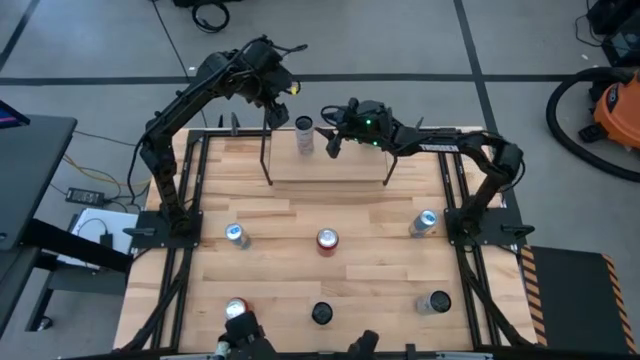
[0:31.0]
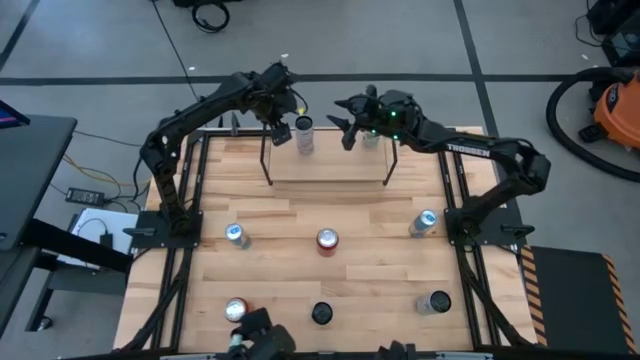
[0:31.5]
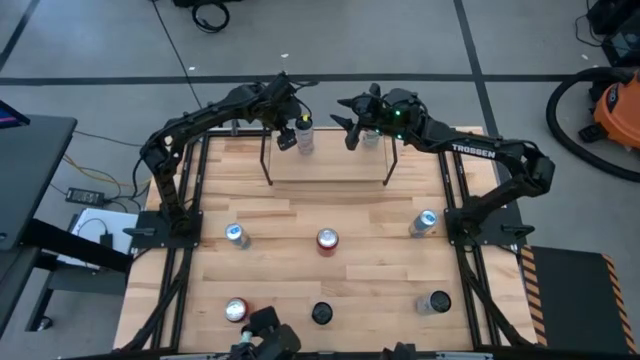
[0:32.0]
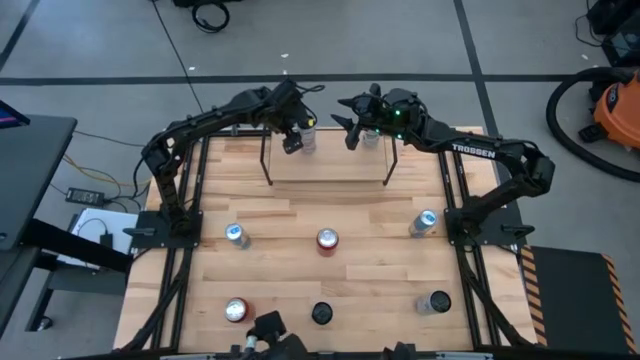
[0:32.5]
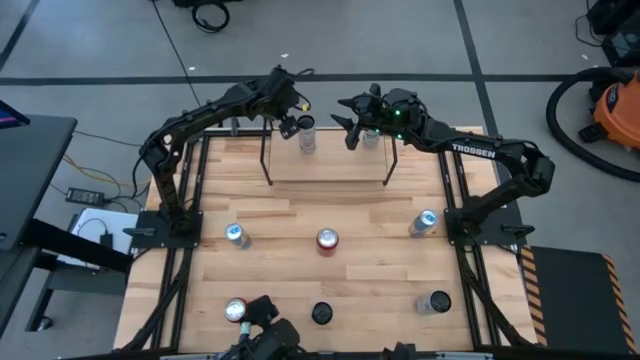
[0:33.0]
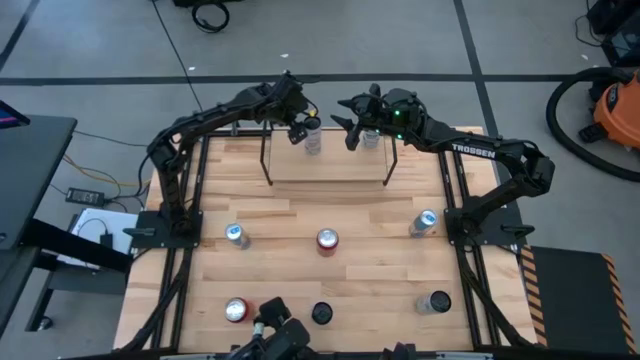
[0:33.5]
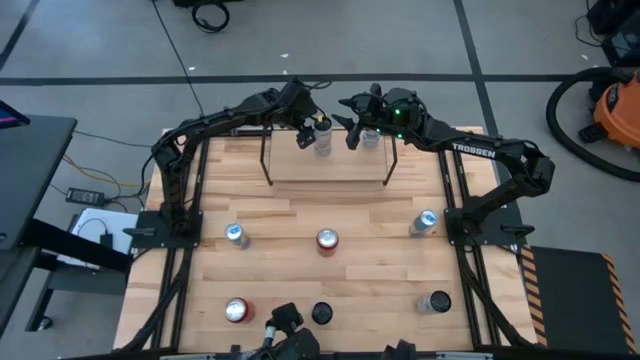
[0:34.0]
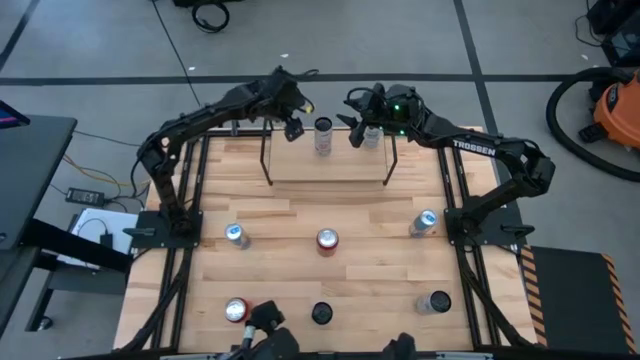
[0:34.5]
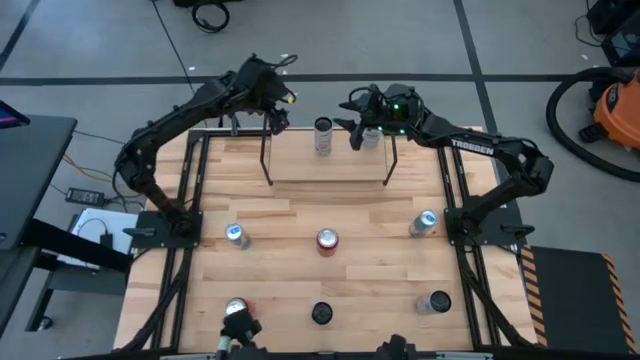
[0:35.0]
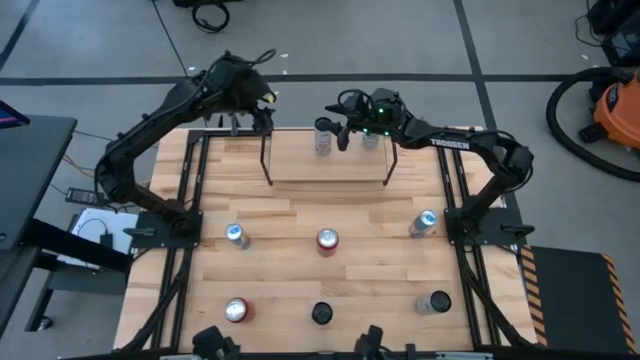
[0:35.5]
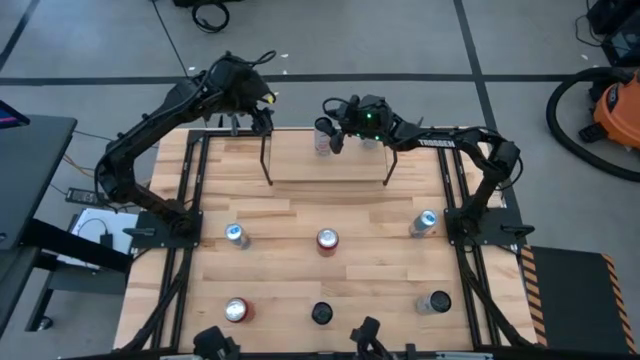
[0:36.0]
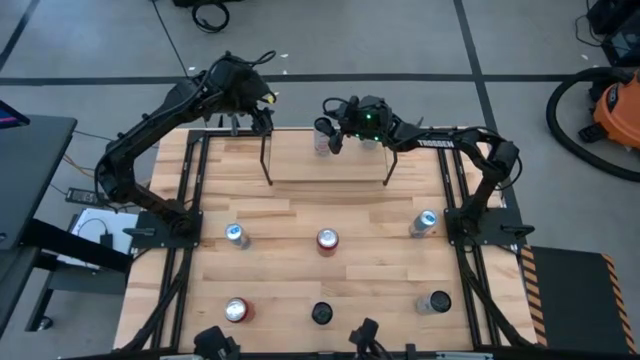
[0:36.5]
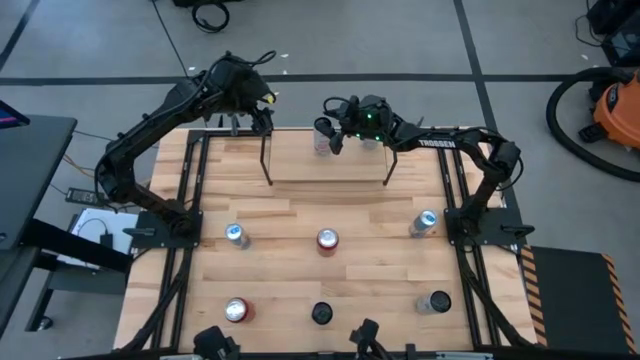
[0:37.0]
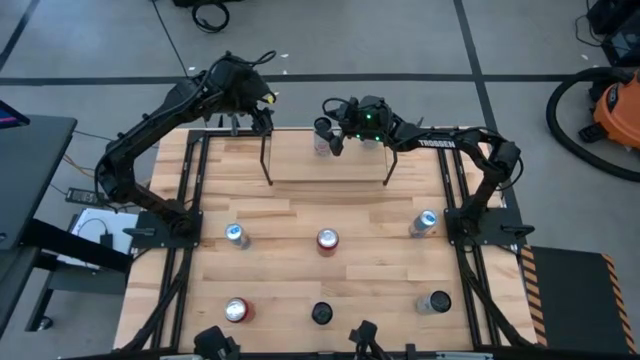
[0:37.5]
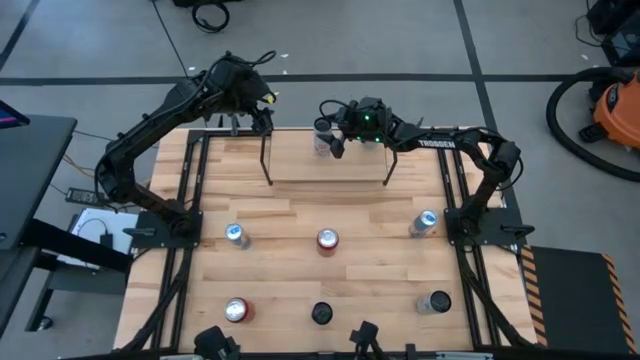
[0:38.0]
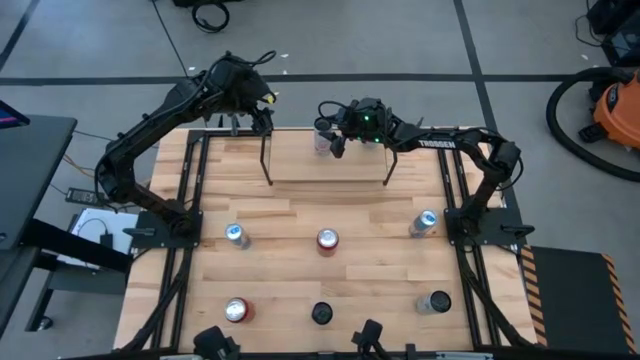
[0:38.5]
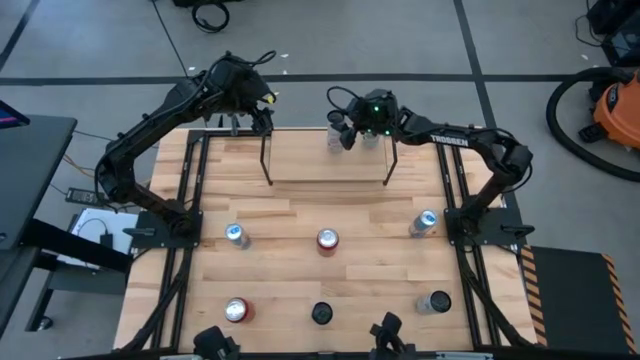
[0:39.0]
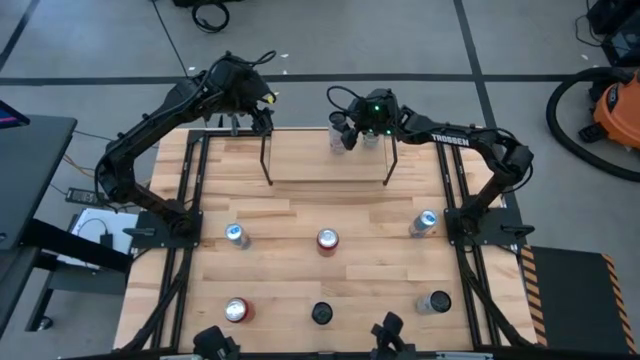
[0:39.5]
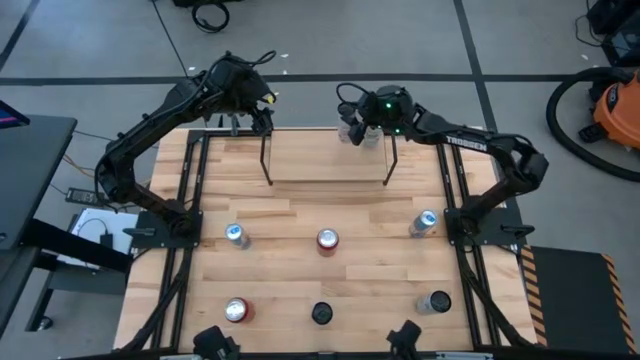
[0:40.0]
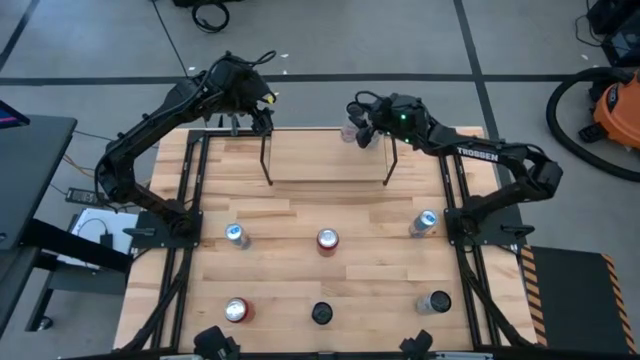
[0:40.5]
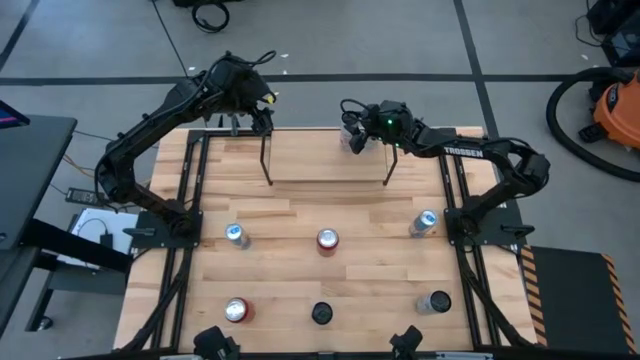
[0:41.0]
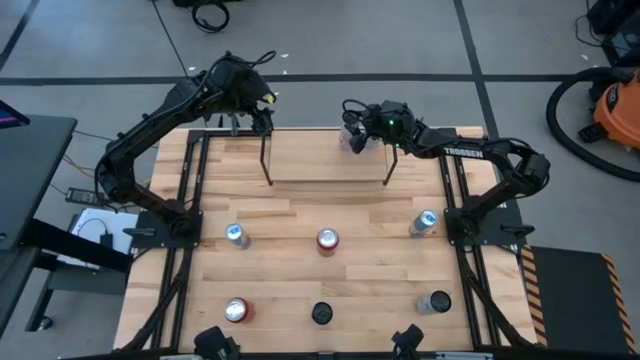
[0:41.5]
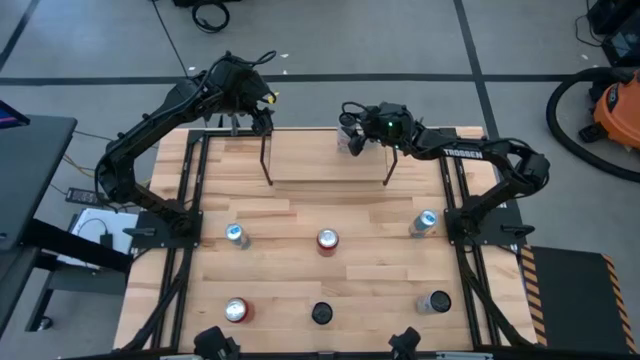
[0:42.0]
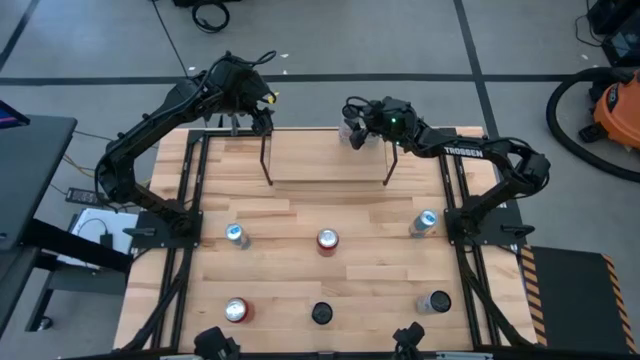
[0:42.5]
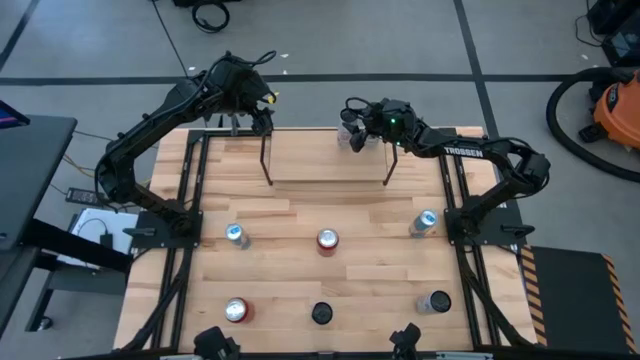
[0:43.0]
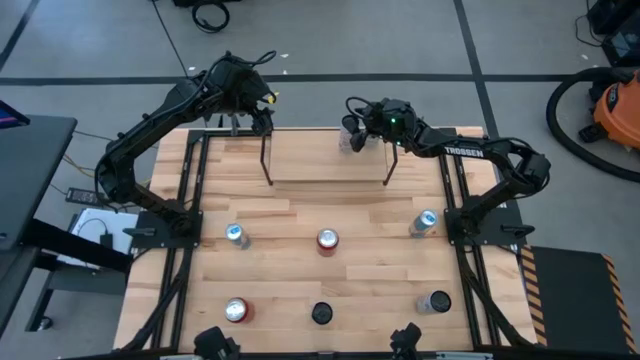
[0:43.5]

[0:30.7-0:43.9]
Task: Place canned beverage on shelf
Put the top white-pink soda can on the shelf

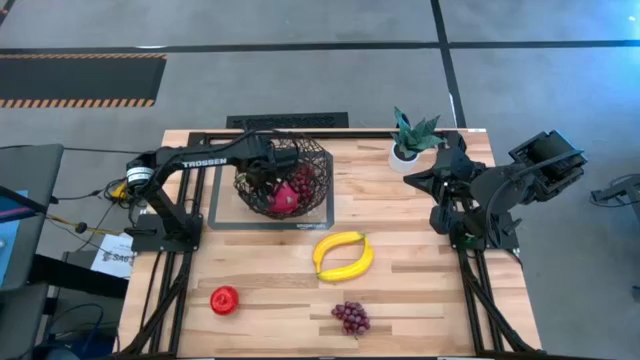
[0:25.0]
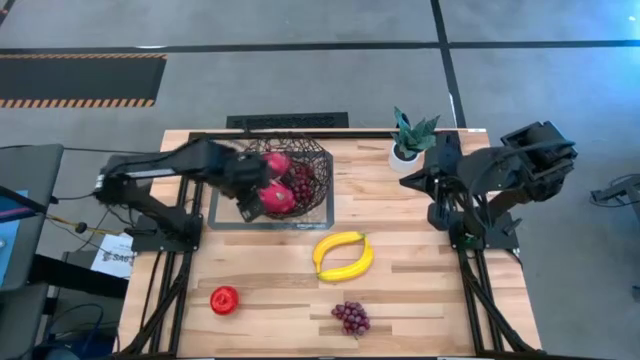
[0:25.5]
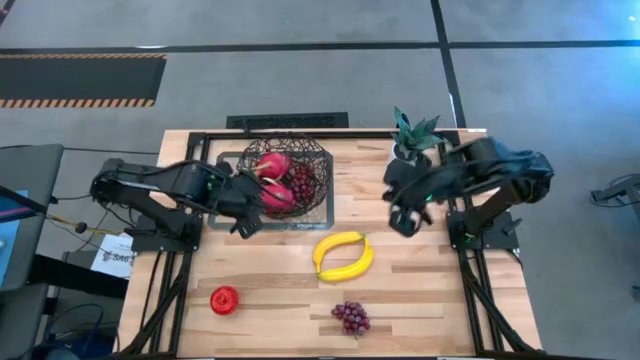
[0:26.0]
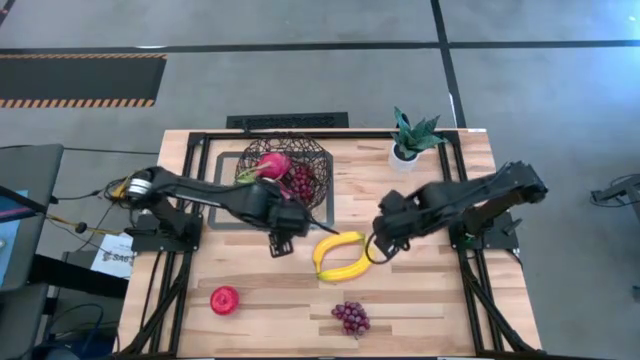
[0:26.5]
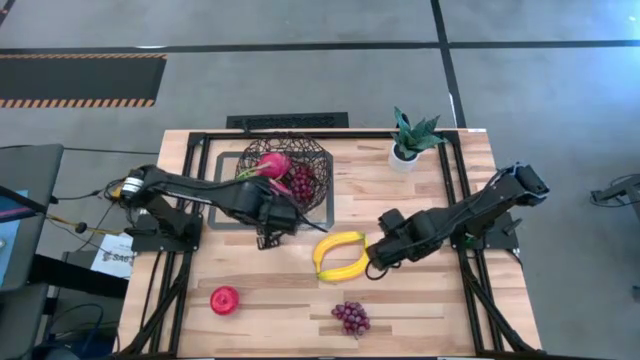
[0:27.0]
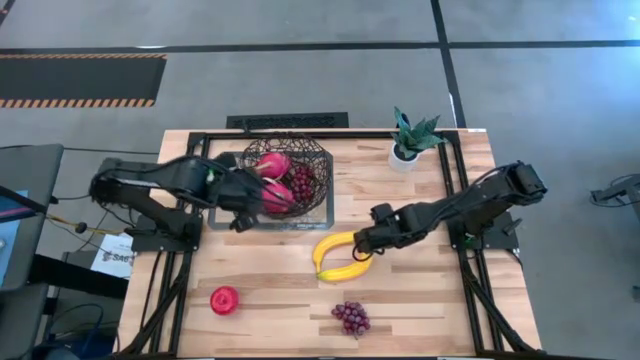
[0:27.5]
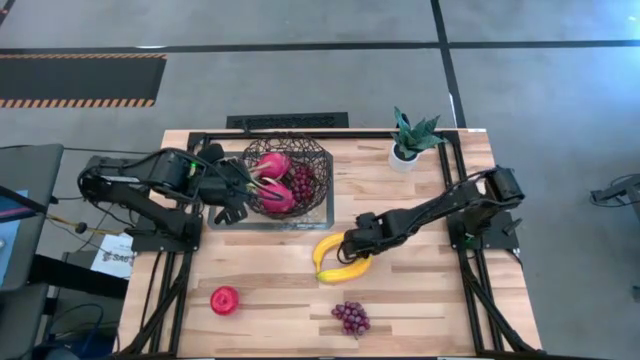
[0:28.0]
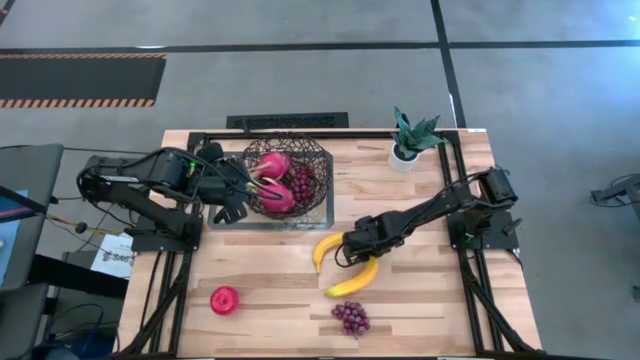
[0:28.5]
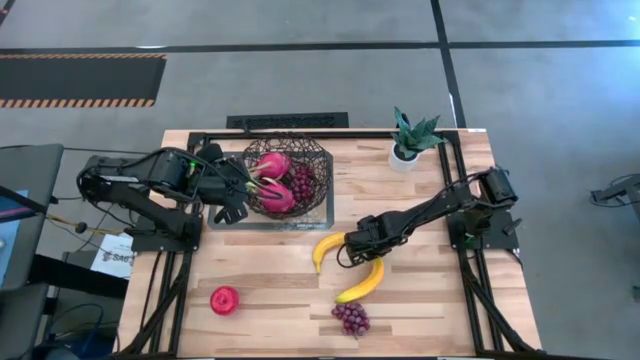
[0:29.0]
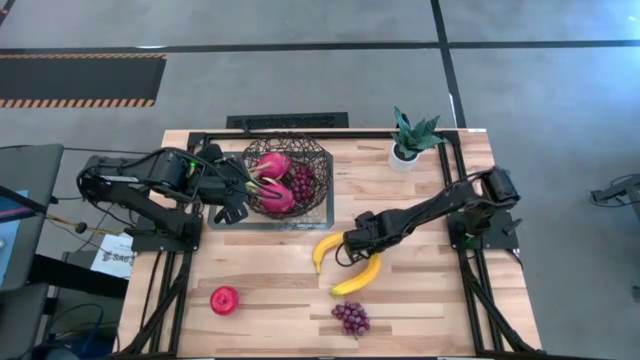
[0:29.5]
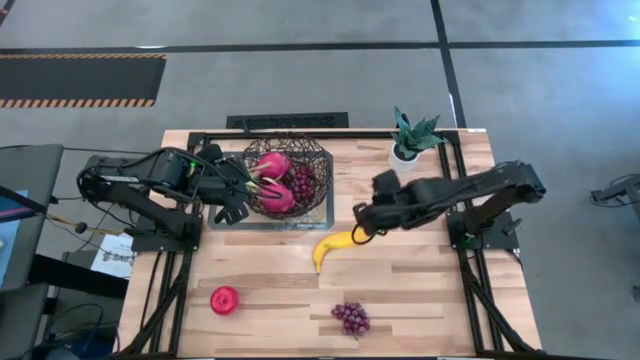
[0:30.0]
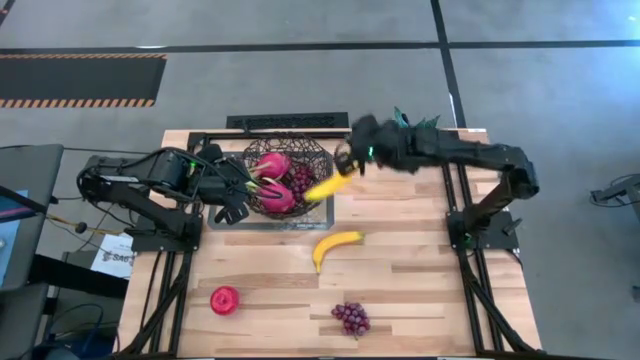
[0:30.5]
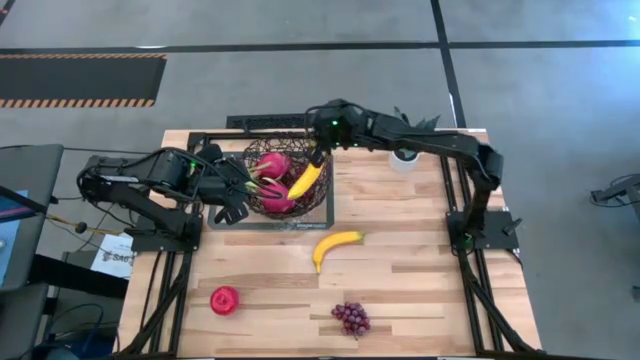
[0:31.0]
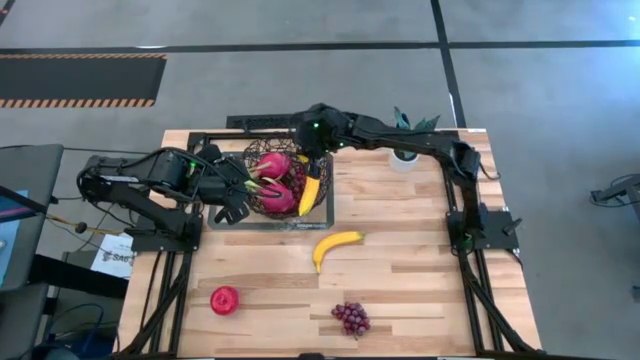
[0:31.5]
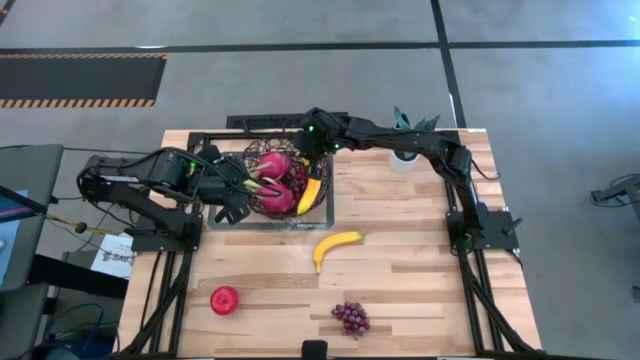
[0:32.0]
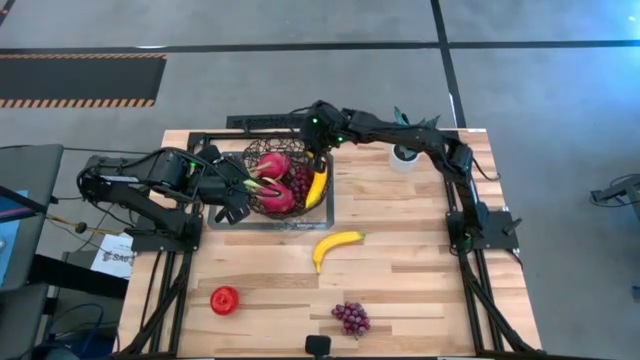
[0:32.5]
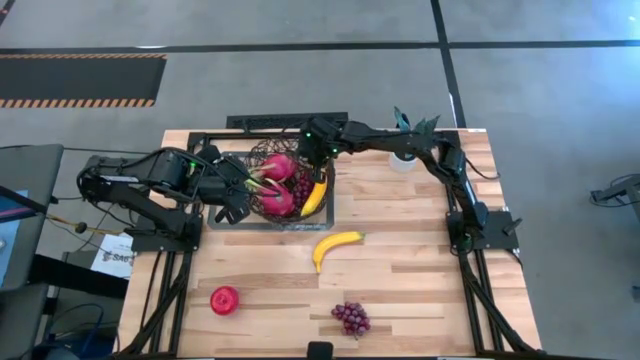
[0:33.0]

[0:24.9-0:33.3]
Task: Build produce basket
Put the bottom yellow banana into the black wire basket

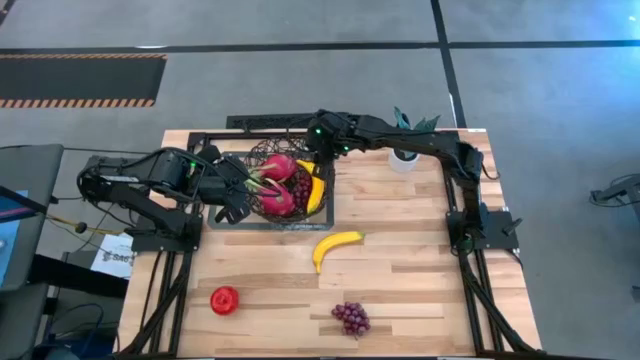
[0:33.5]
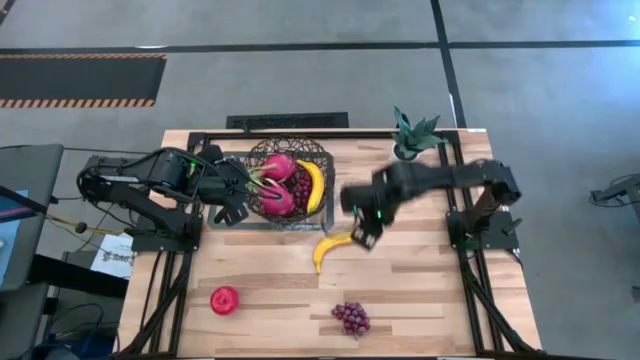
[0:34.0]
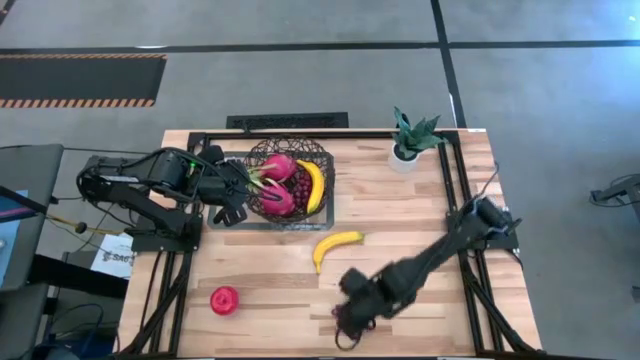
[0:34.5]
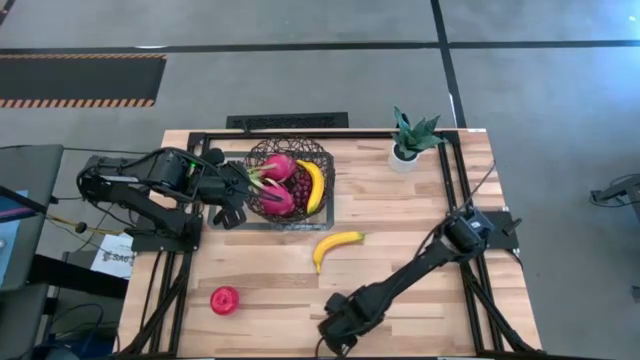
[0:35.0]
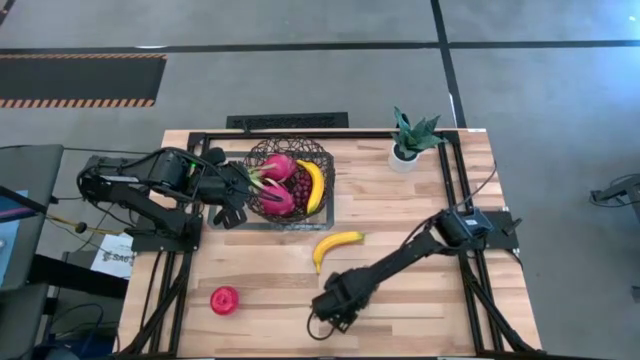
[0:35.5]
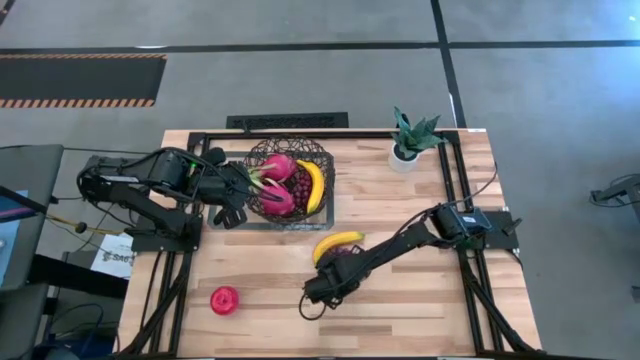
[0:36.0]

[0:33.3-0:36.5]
Put the purple grapes into the black wire basket
